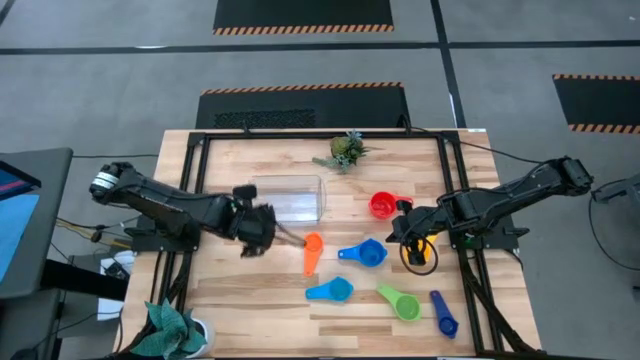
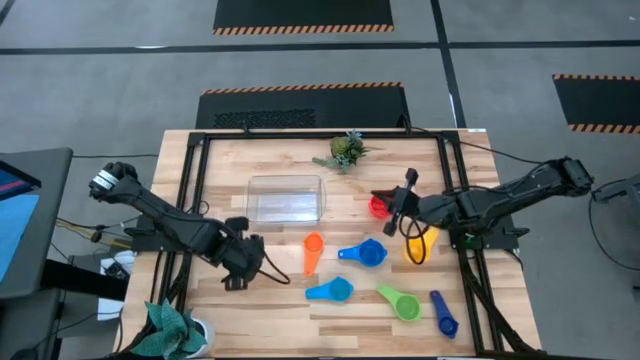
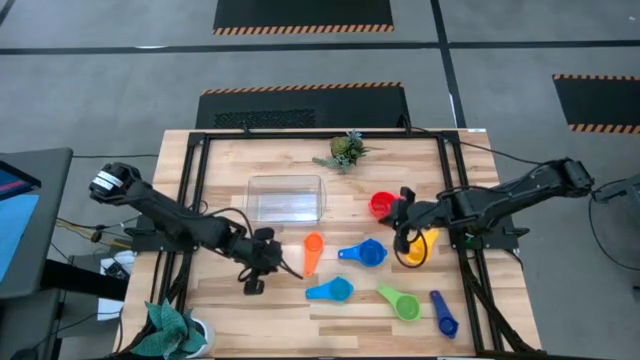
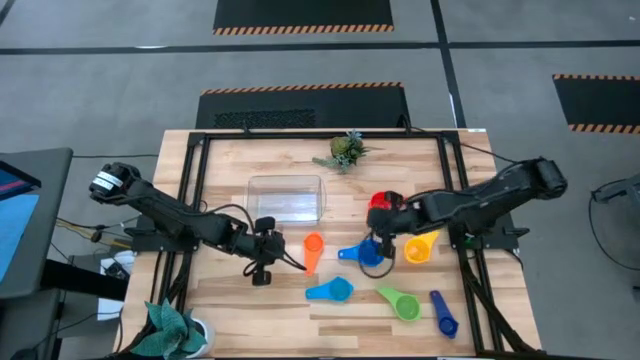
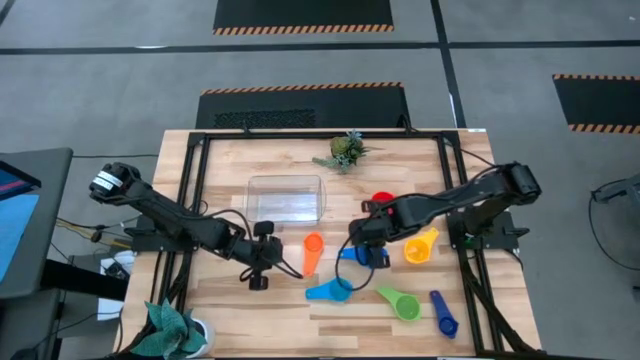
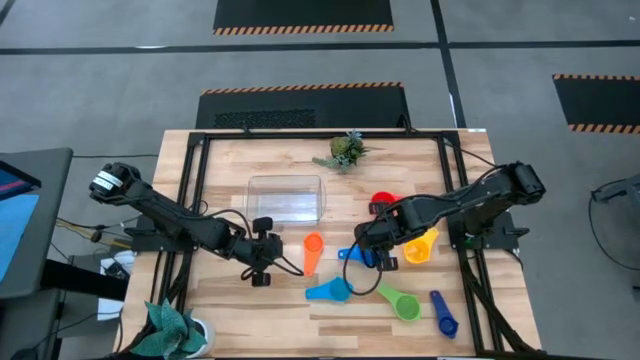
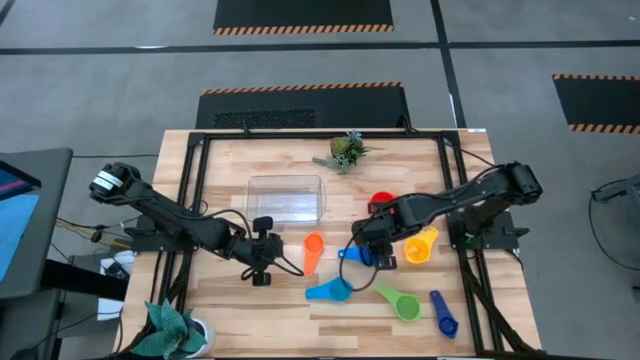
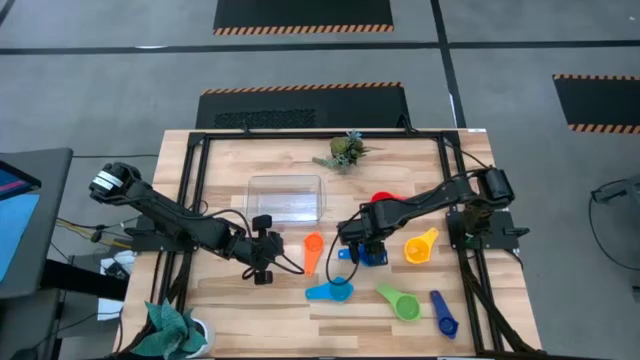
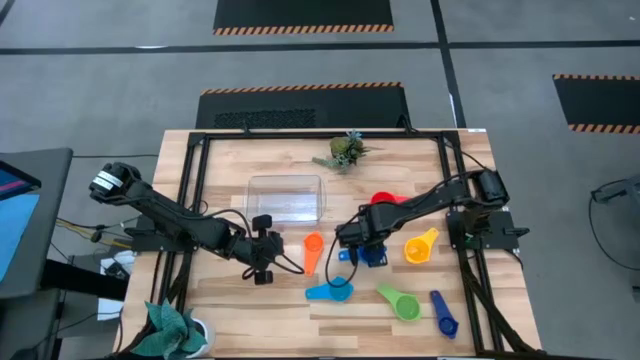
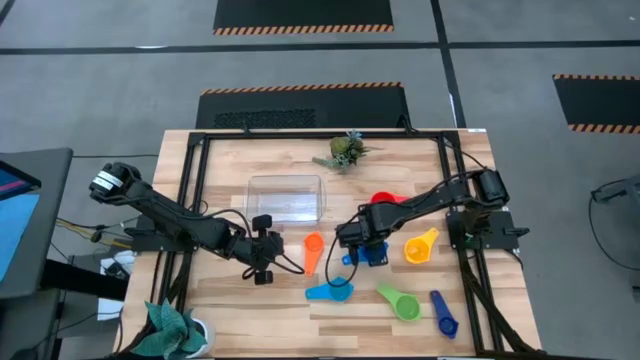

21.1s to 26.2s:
Task: Nest measuring cups in basket
Stack the blue measuring cup on top of the red measuring cup

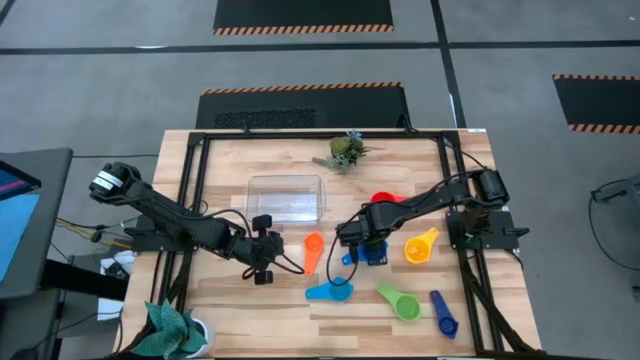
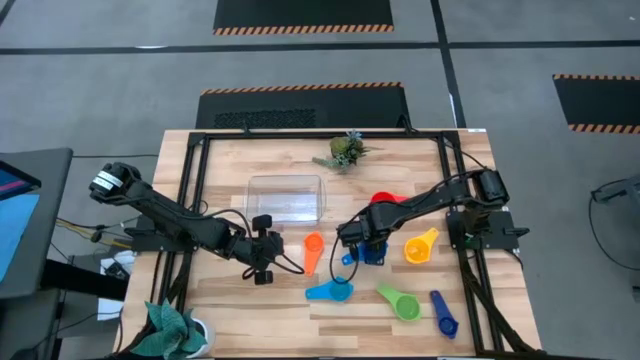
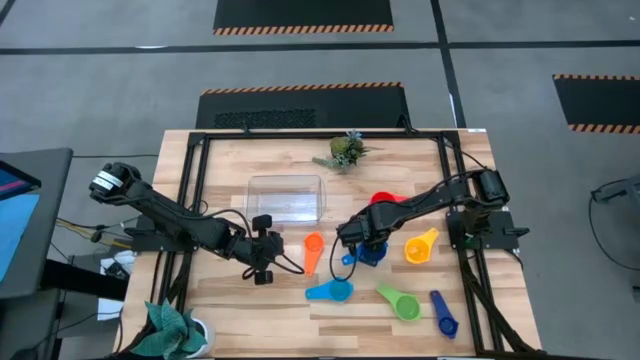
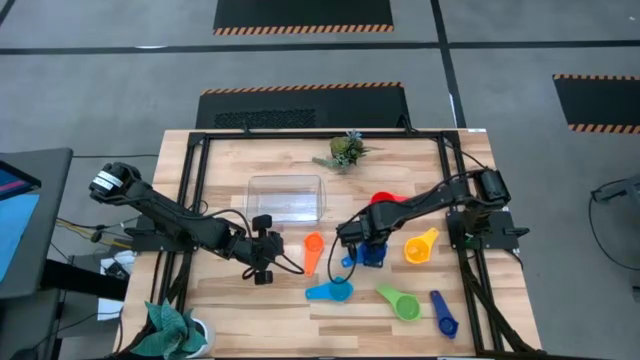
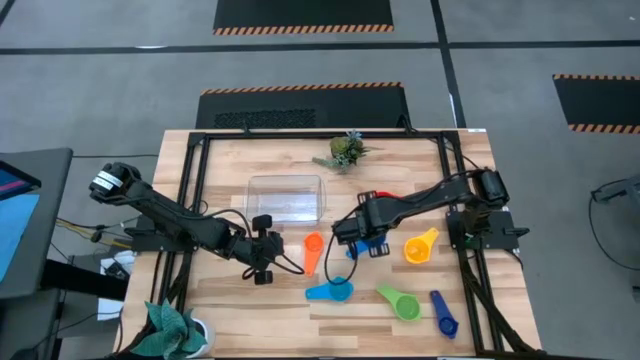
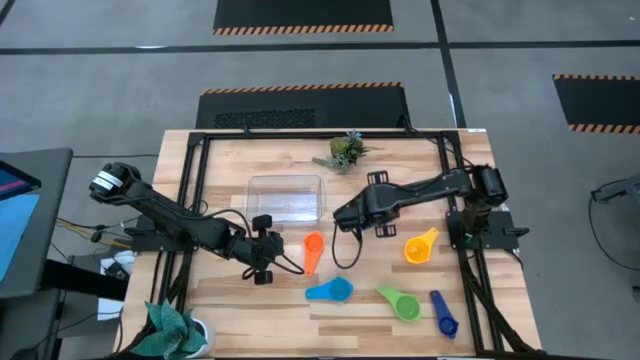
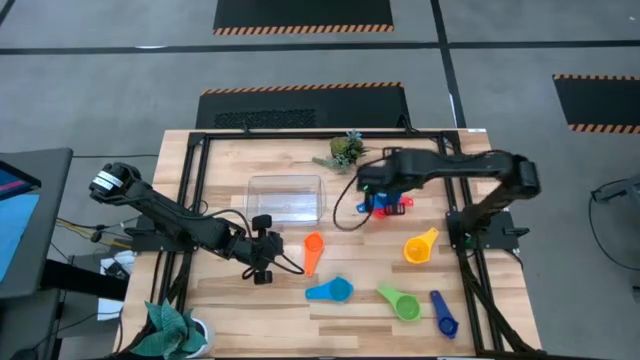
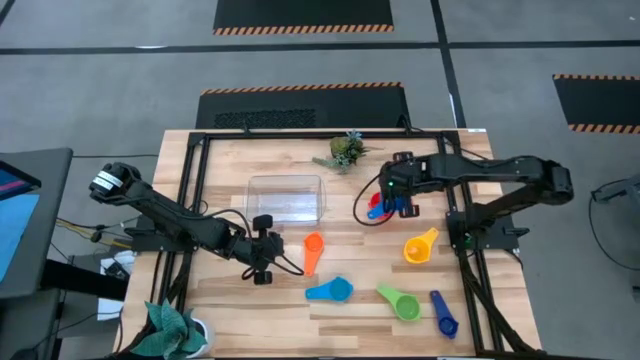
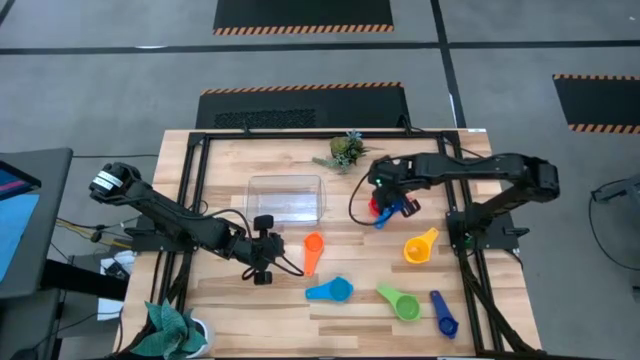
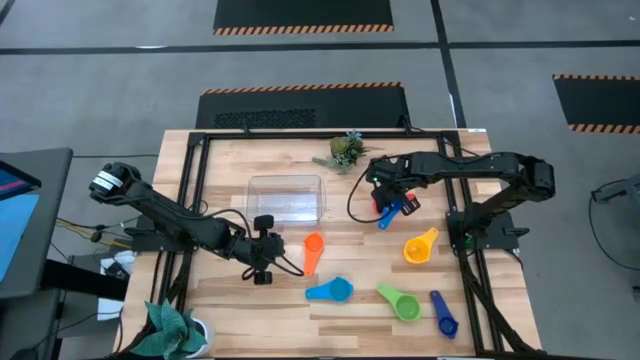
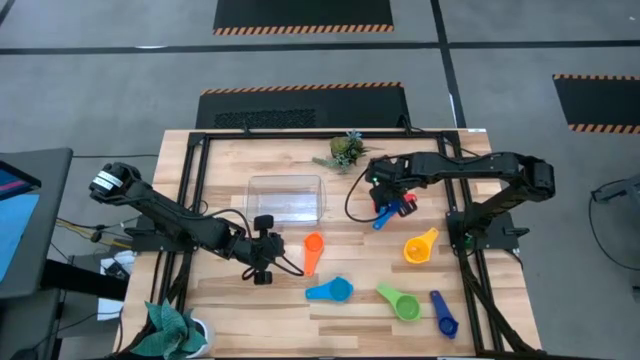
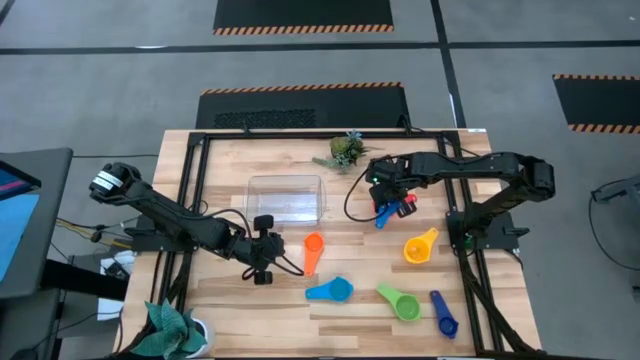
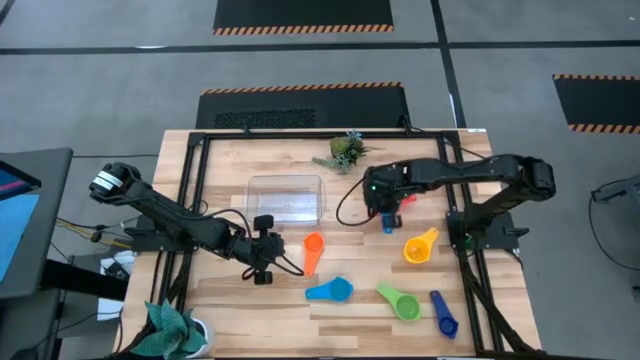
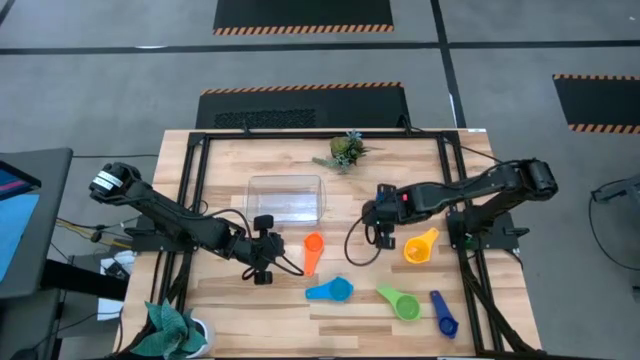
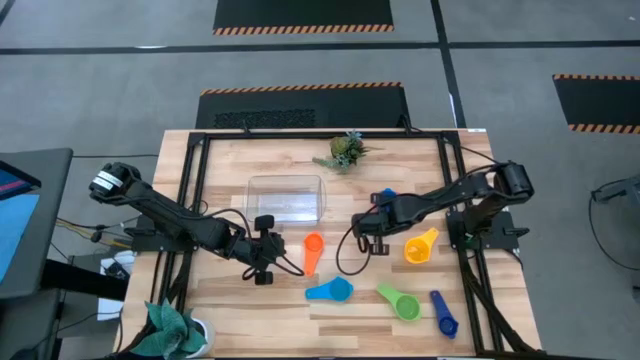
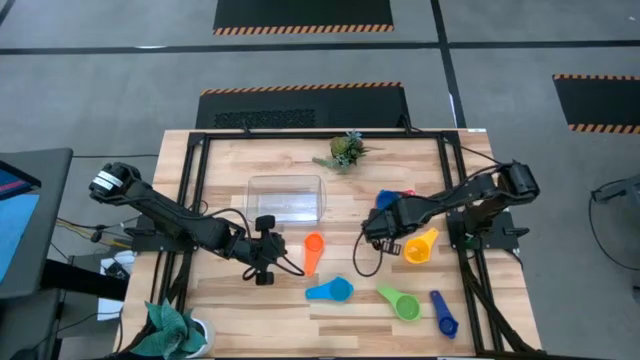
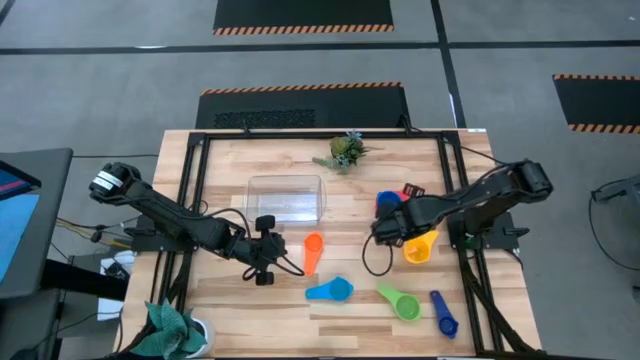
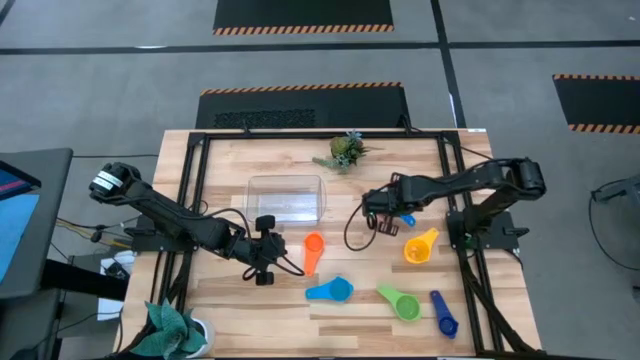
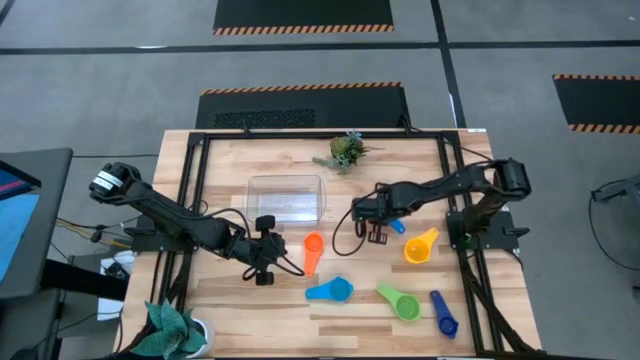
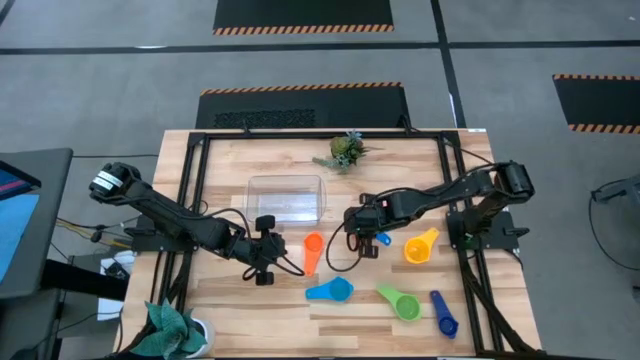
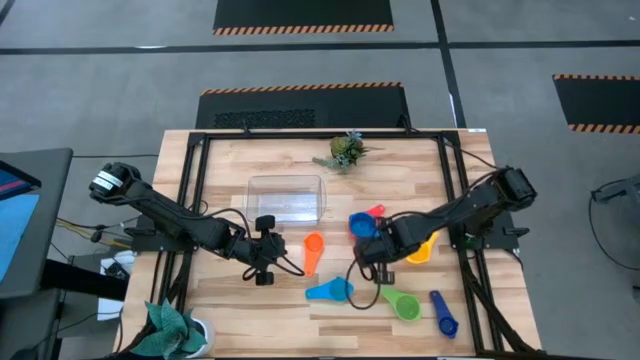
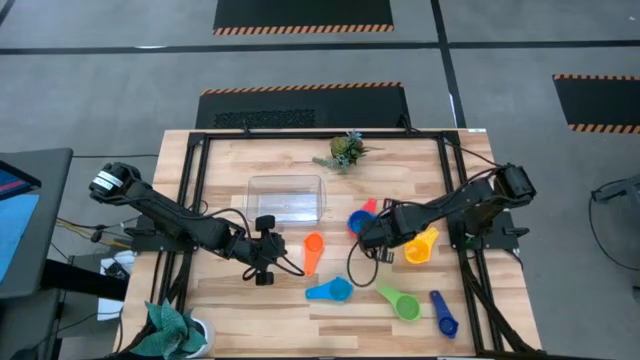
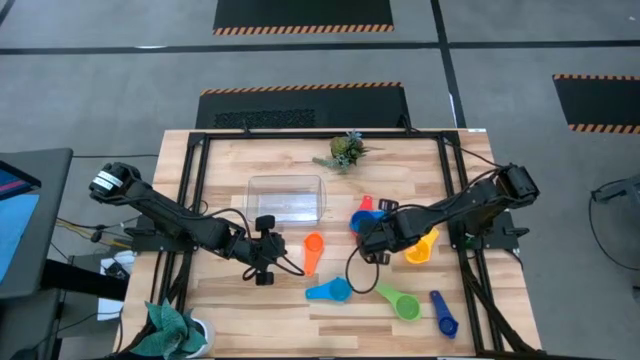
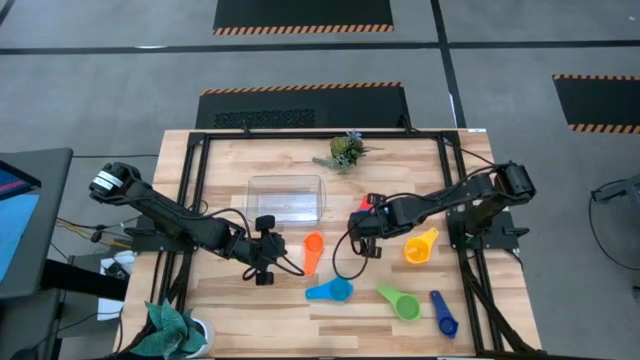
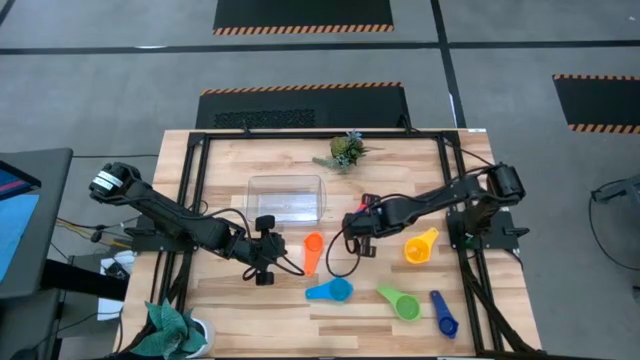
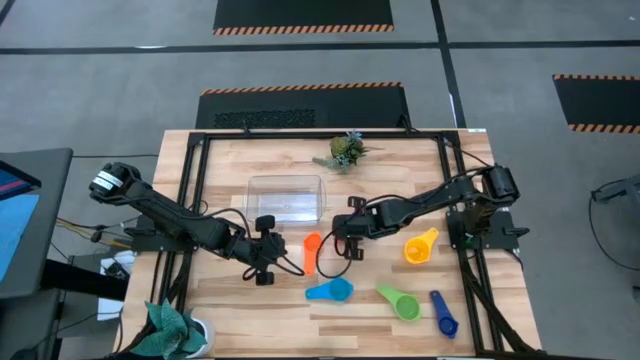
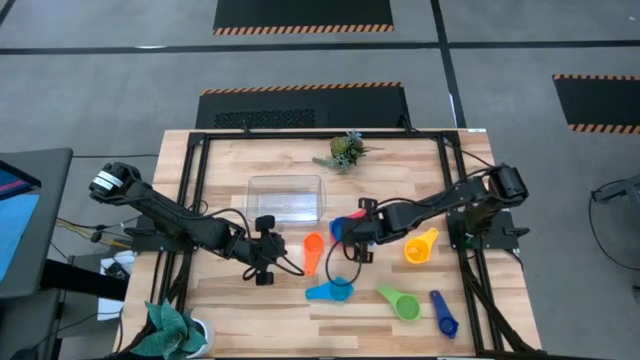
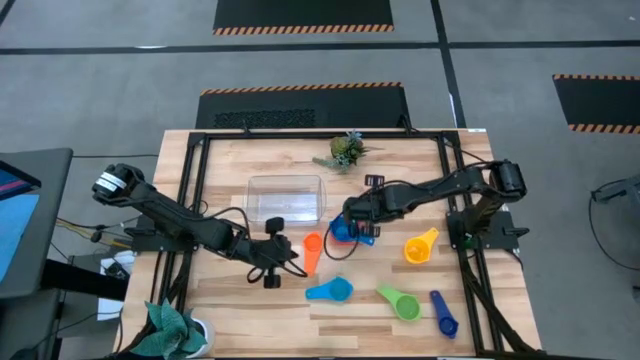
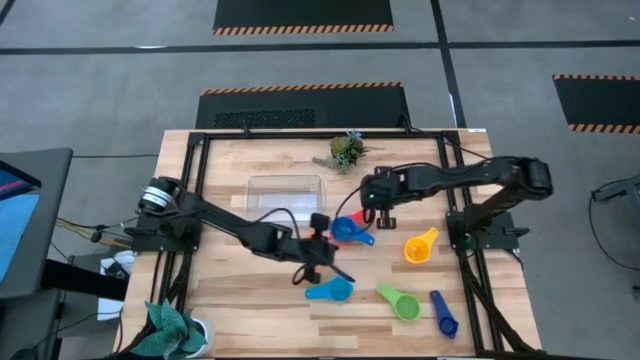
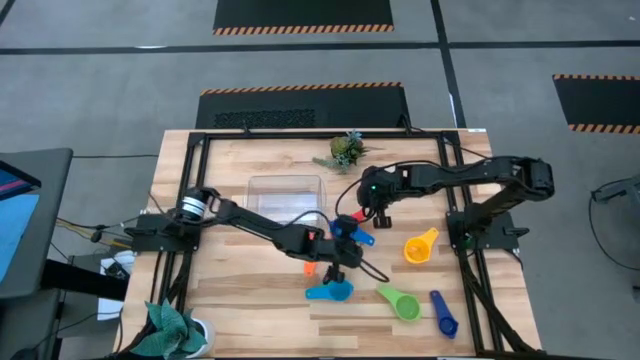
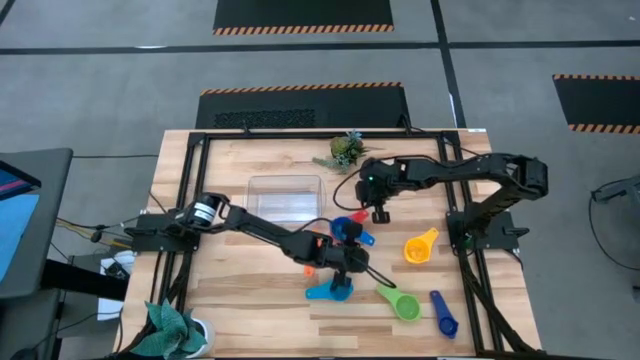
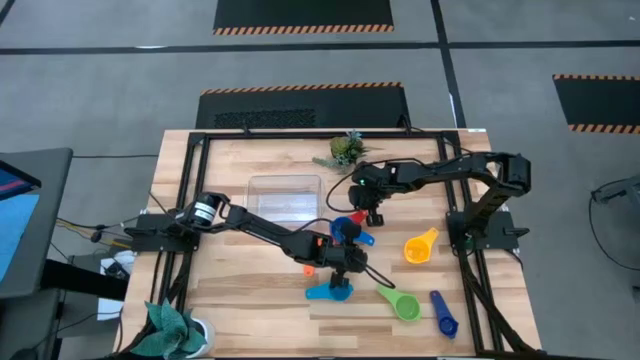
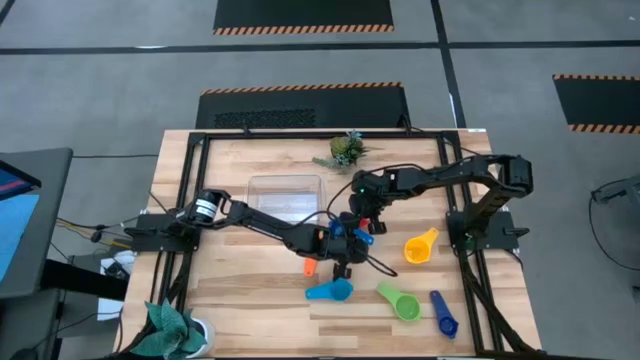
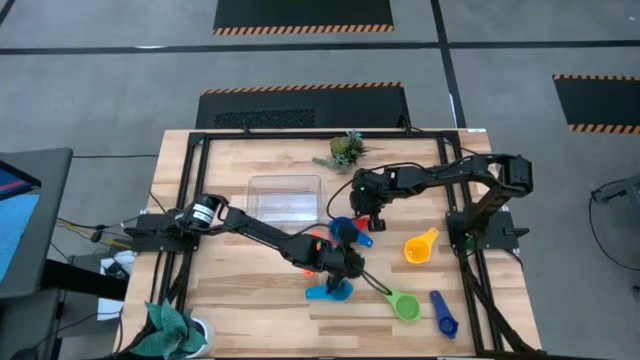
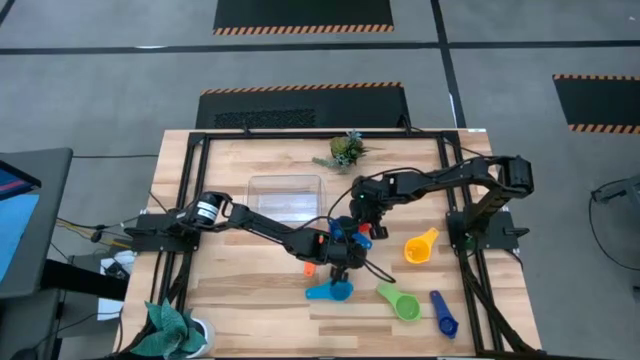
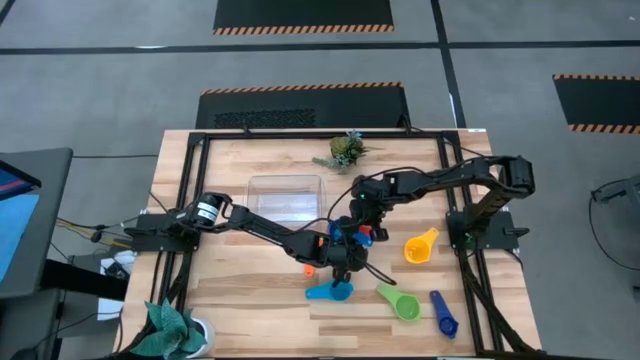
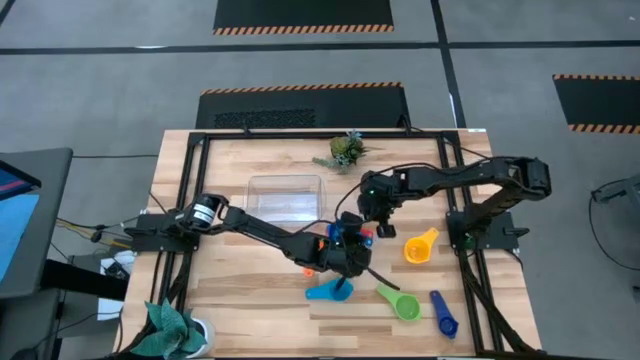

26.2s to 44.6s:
Stack the blue measuring cup on top of the red measuring cup
